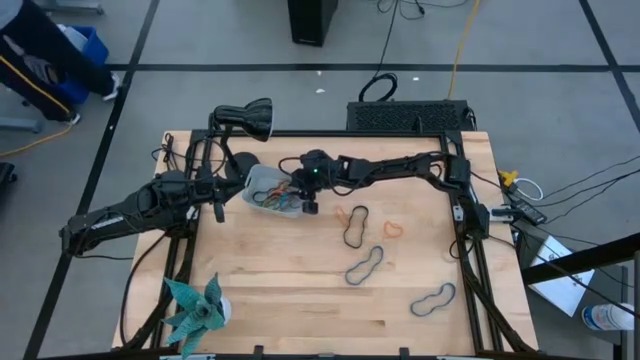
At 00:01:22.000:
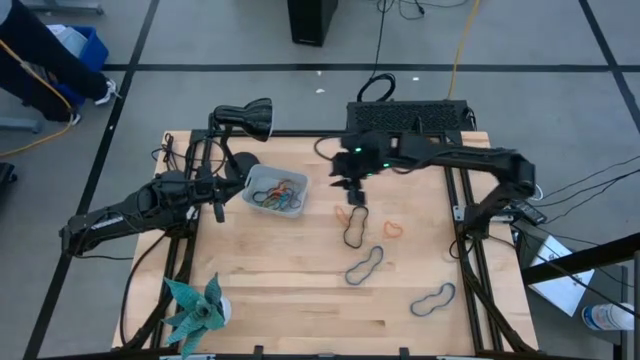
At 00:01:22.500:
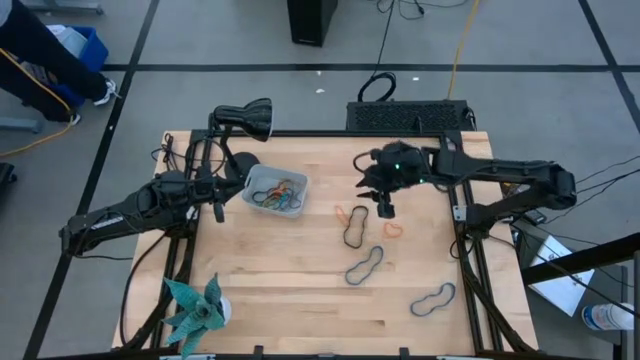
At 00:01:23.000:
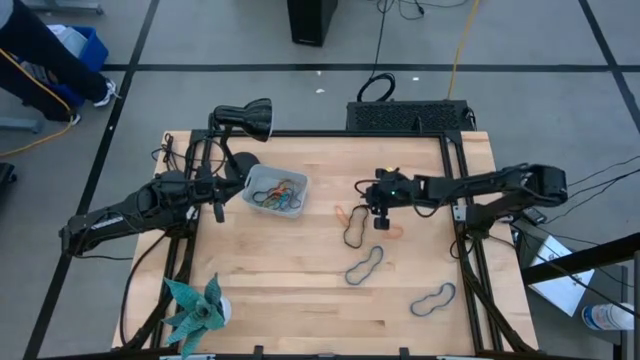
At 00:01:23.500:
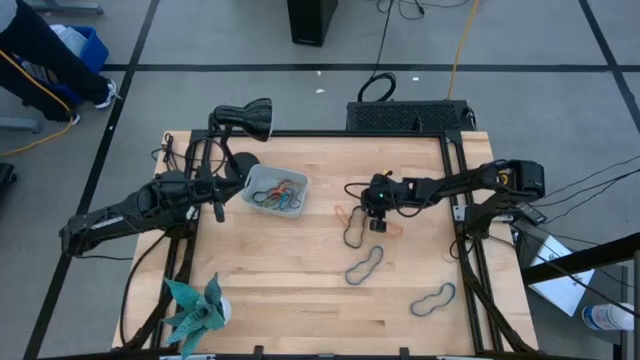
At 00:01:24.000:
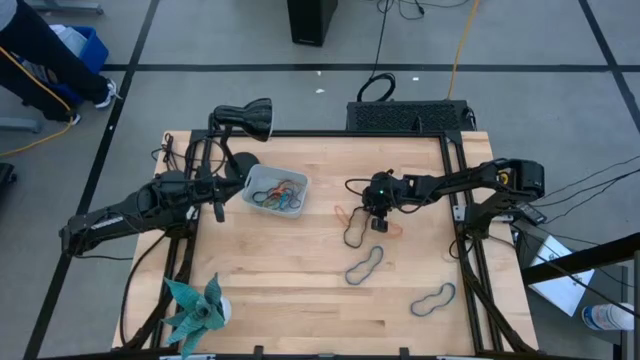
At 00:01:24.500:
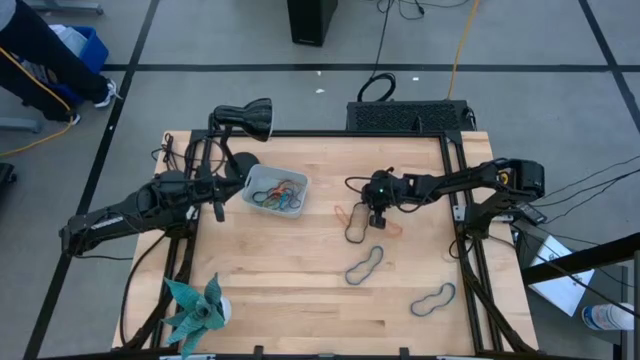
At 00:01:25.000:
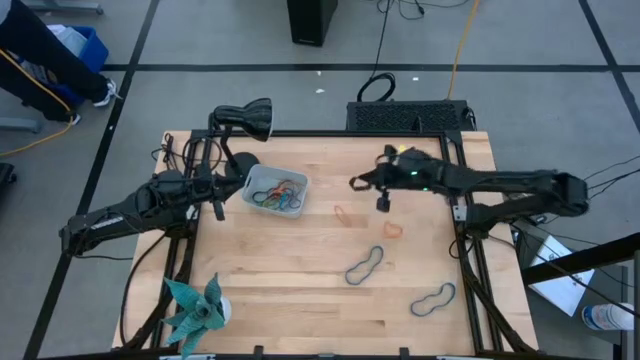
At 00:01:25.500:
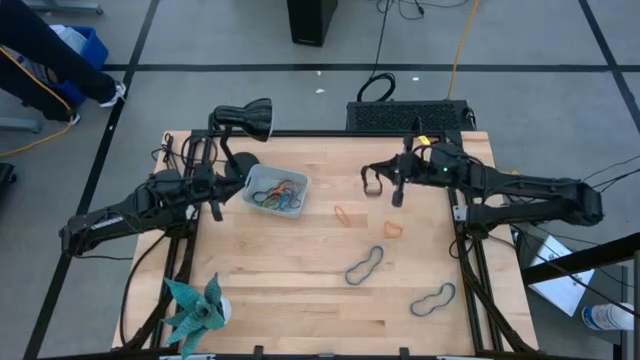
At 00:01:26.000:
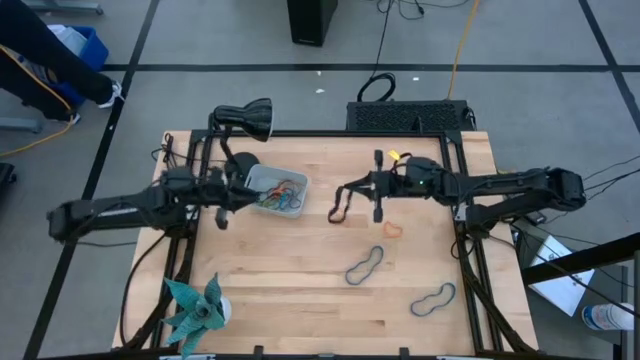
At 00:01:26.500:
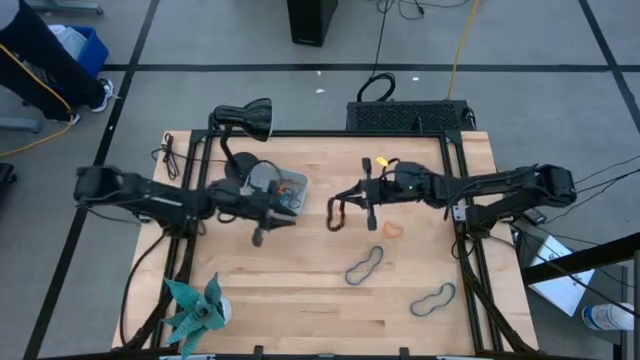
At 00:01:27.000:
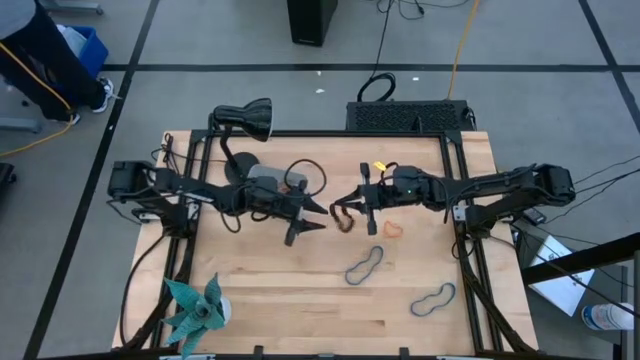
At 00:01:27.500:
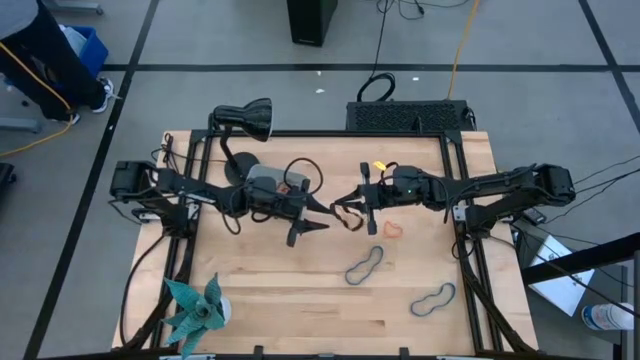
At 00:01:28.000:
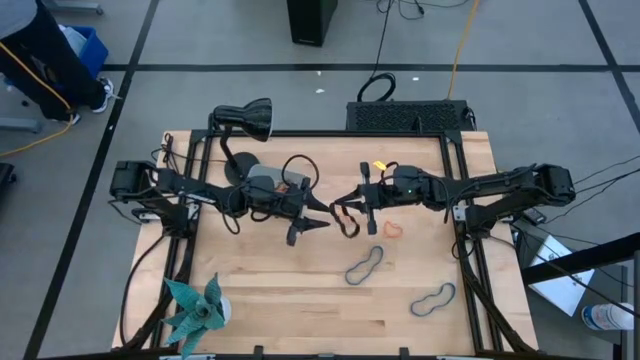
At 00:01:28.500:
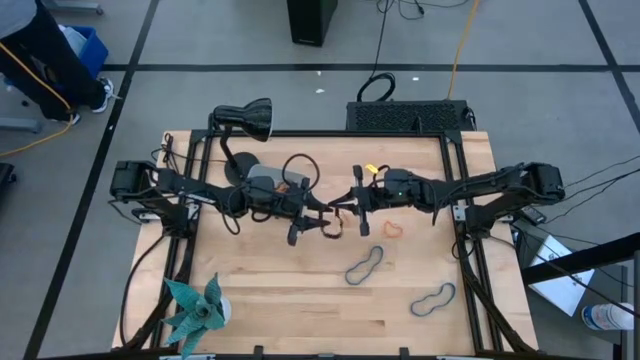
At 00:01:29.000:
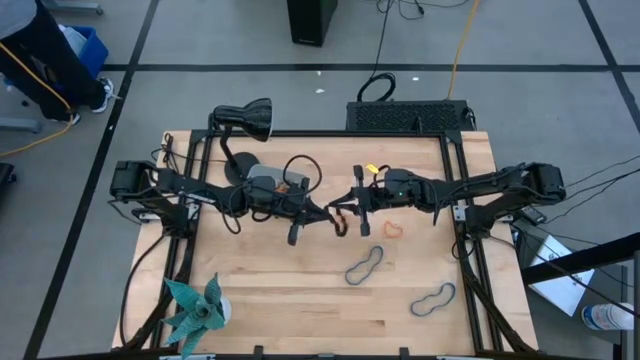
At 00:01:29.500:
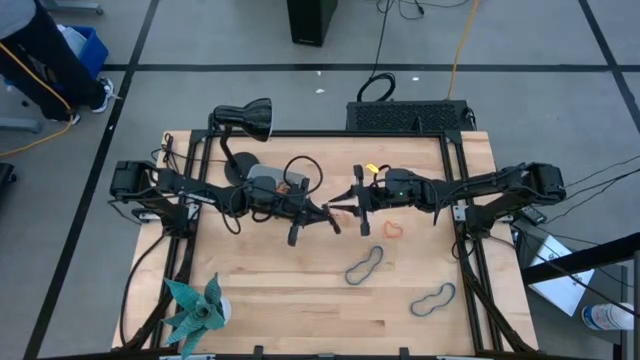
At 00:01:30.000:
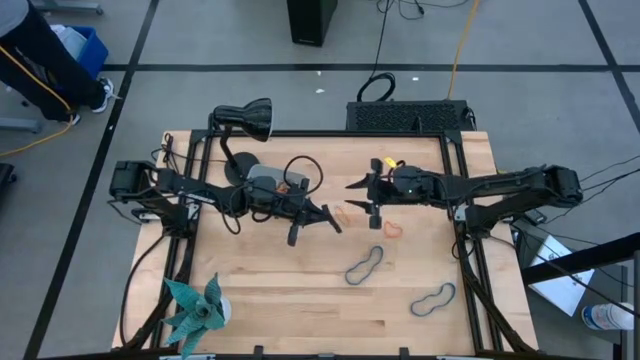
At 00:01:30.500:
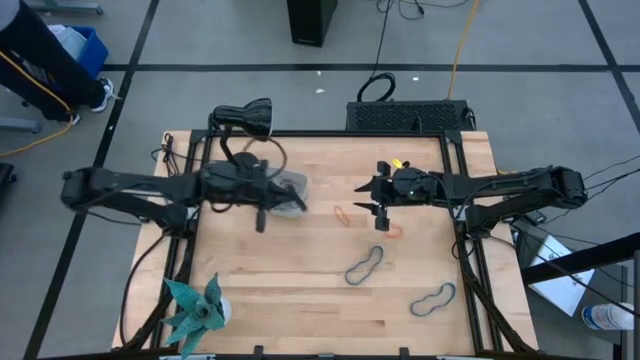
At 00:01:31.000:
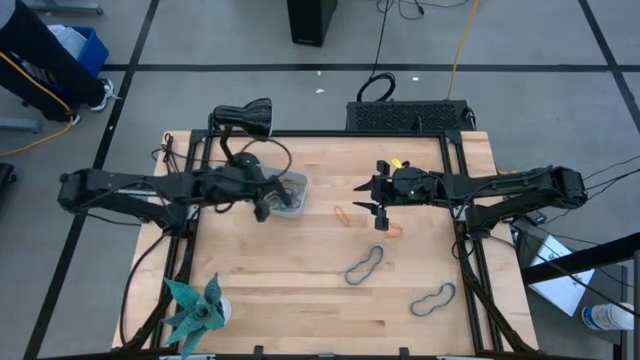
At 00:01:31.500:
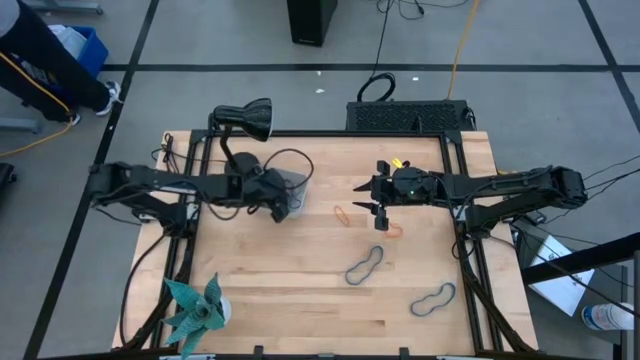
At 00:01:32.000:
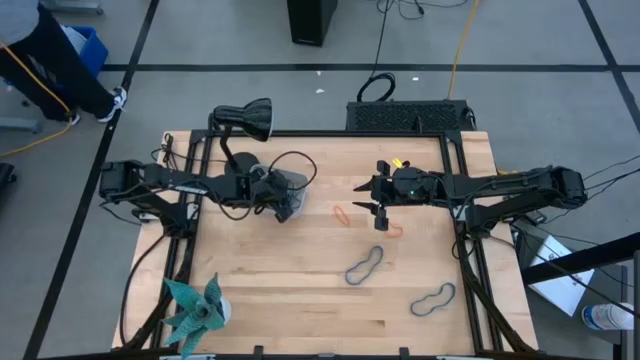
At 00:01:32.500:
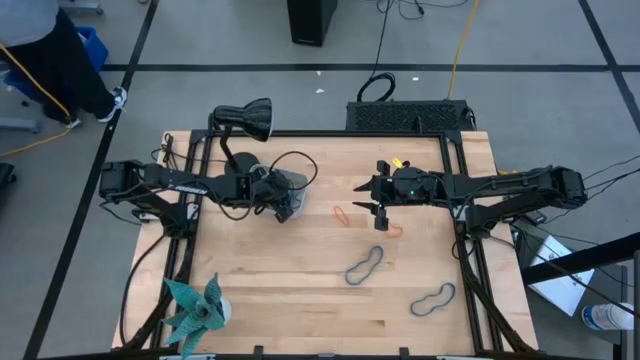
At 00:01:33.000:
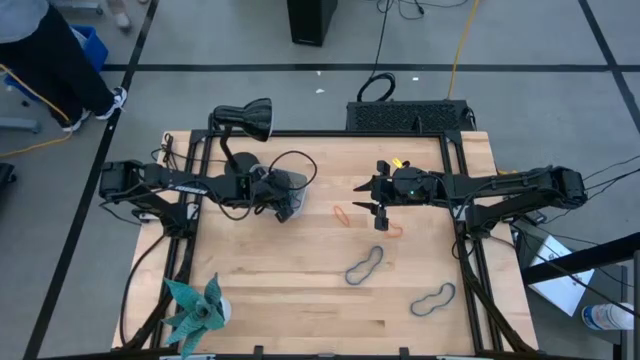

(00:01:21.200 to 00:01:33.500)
Task: Pick and place rubber bands into bin
Put the black rubber band into the gray bin

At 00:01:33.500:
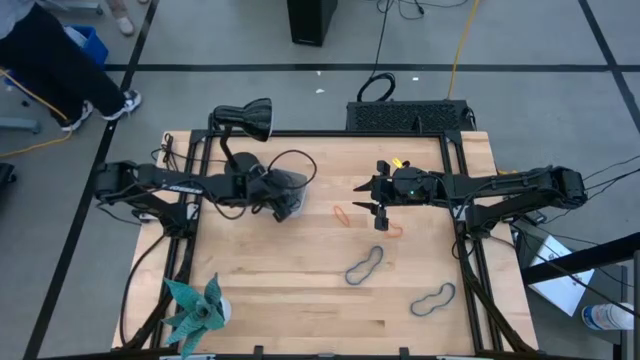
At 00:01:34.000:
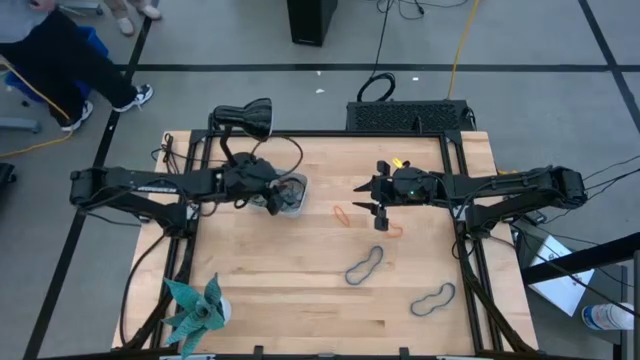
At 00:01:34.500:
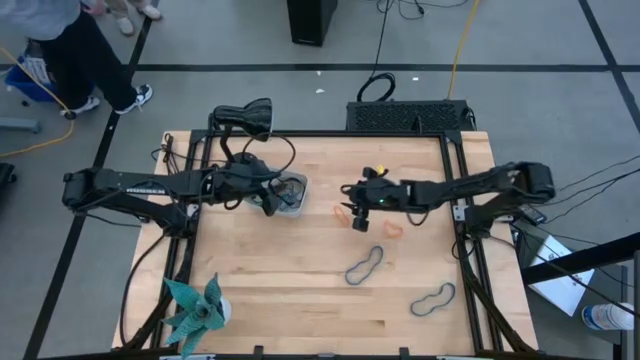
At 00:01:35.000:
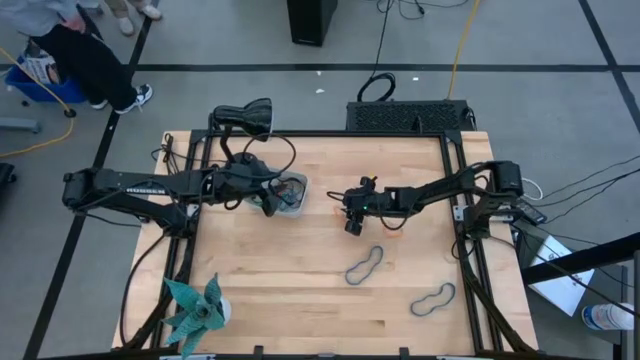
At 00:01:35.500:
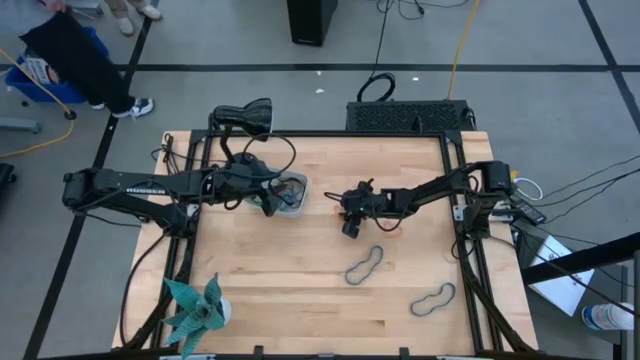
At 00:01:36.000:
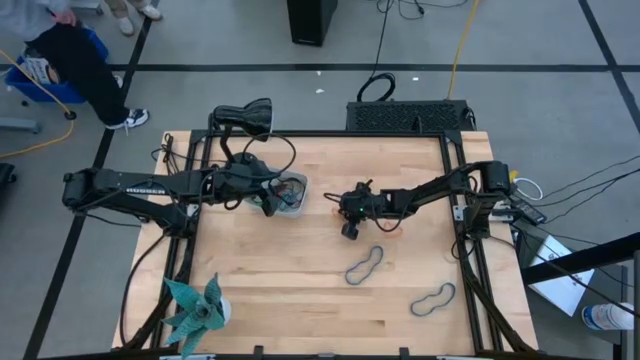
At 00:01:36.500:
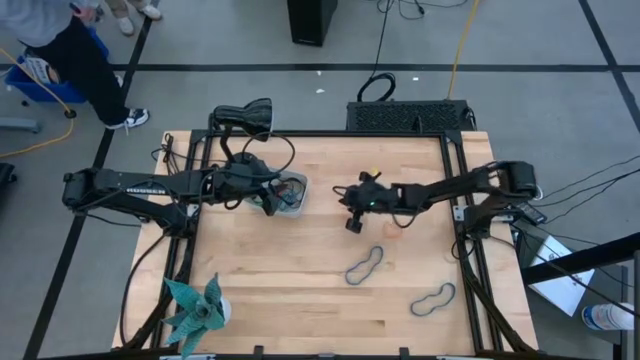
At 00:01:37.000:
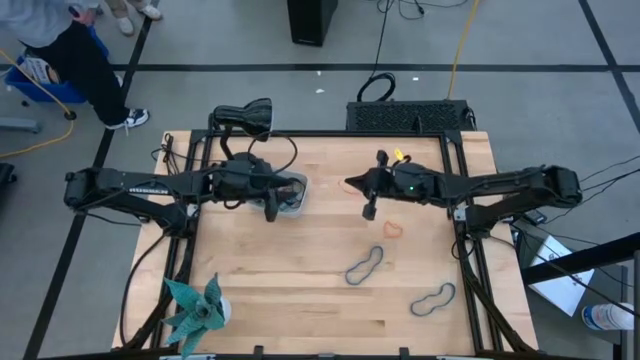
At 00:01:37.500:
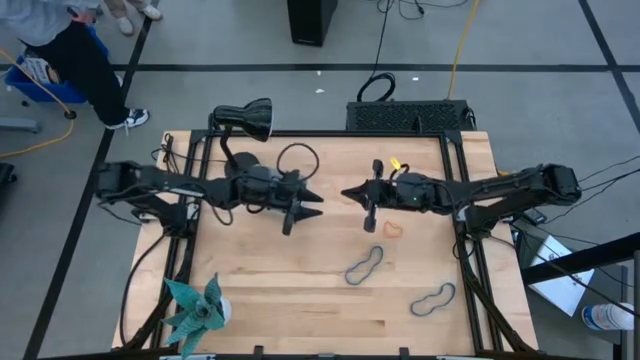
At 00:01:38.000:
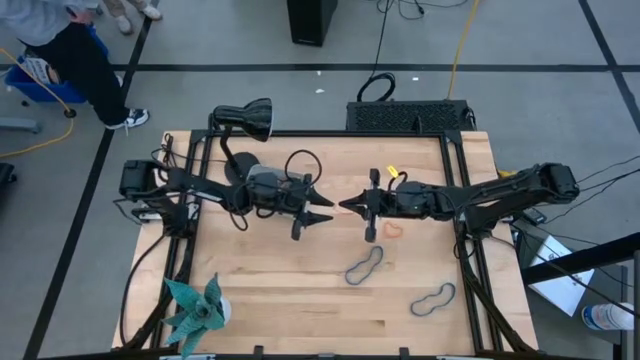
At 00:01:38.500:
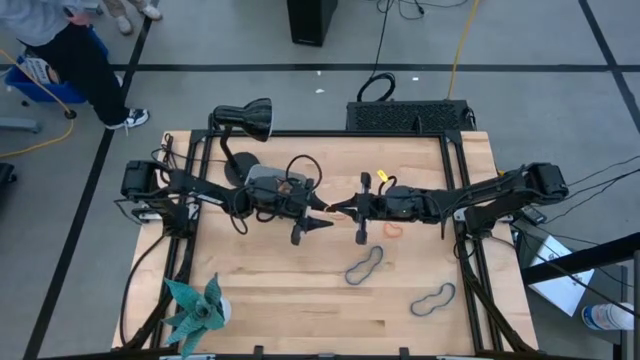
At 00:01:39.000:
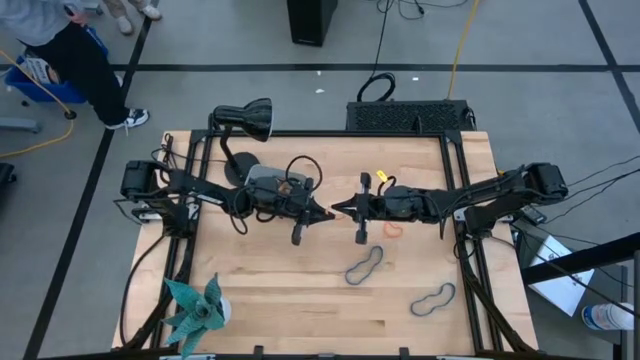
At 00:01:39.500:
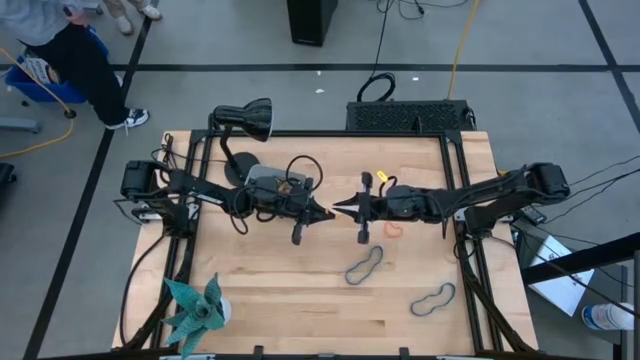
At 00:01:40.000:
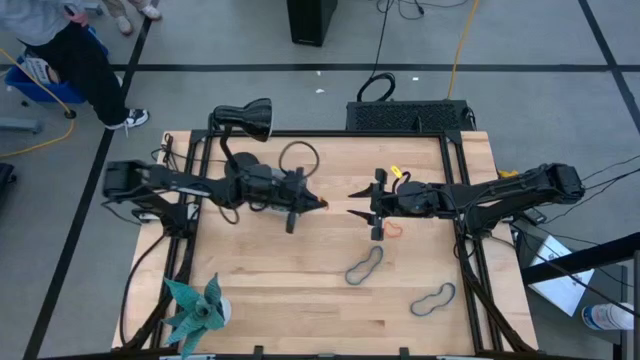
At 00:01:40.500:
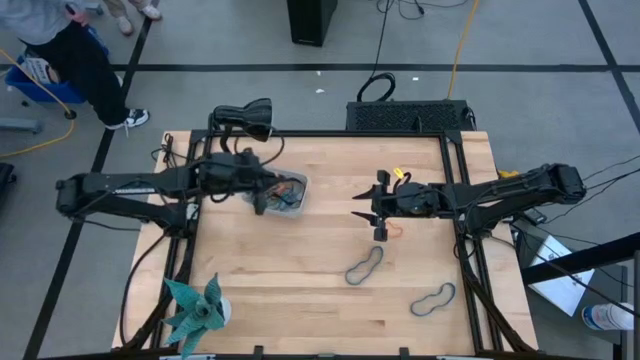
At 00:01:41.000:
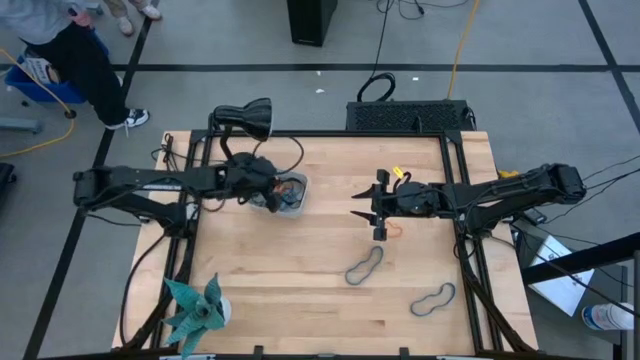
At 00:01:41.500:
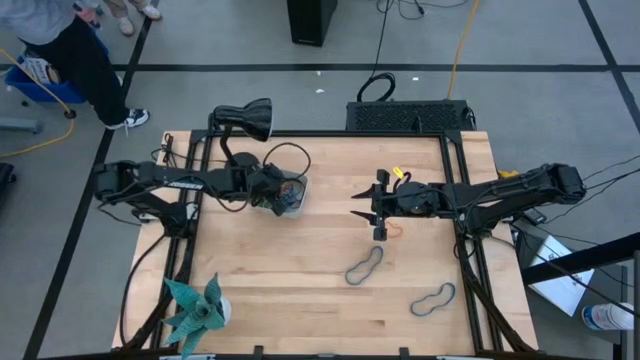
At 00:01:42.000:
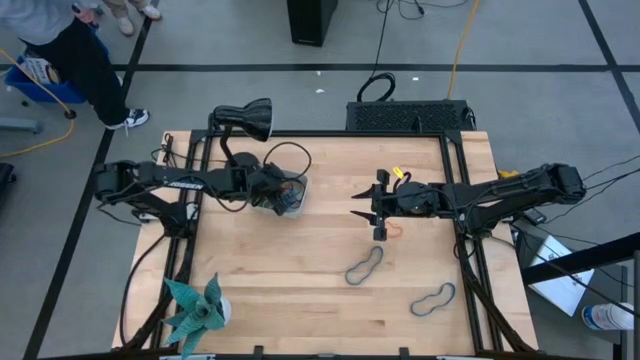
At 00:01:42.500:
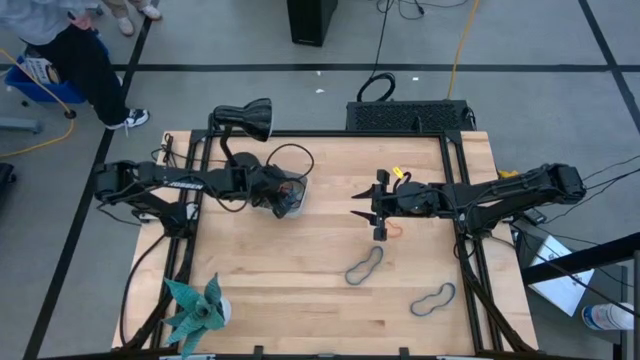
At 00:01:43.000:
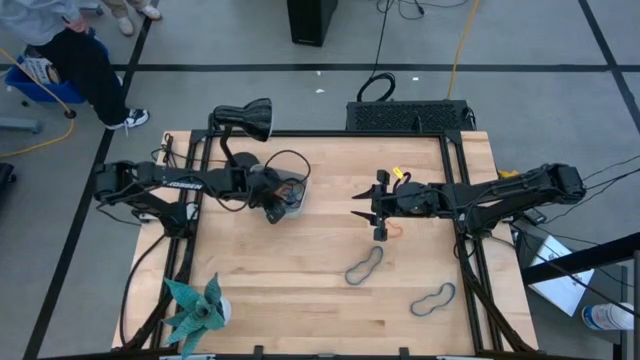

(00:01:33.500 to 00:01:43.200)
Put the left orange rubber band into the gray bin
